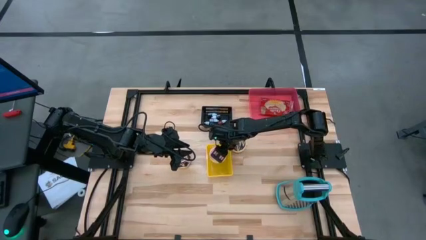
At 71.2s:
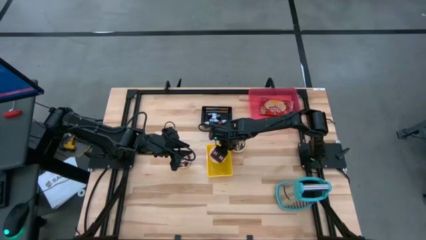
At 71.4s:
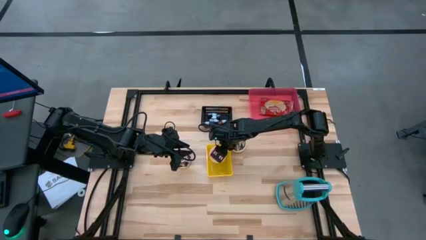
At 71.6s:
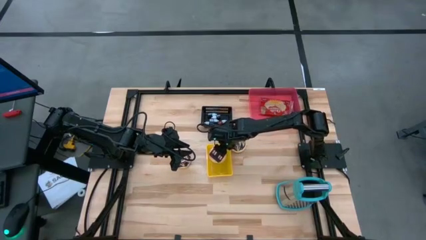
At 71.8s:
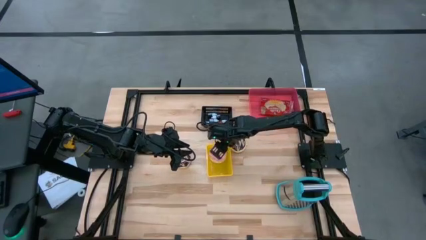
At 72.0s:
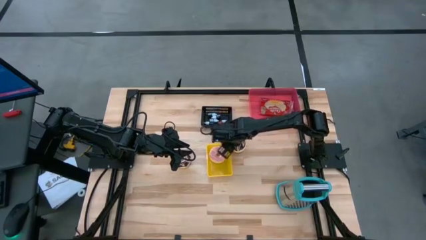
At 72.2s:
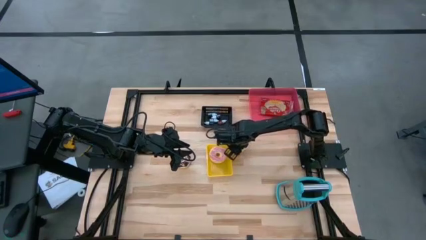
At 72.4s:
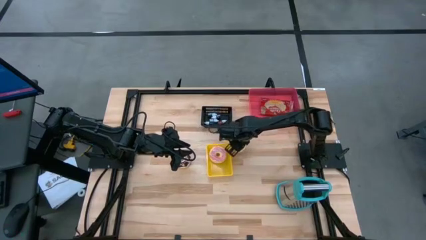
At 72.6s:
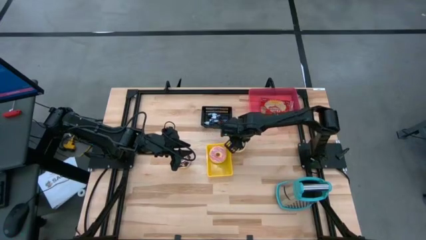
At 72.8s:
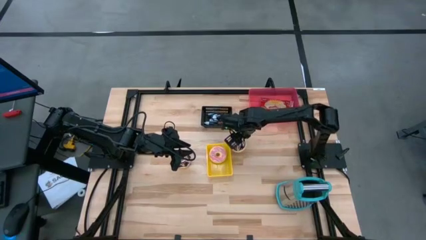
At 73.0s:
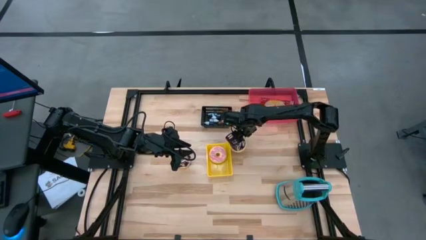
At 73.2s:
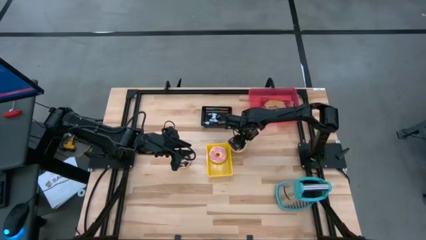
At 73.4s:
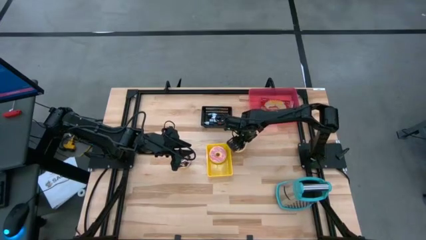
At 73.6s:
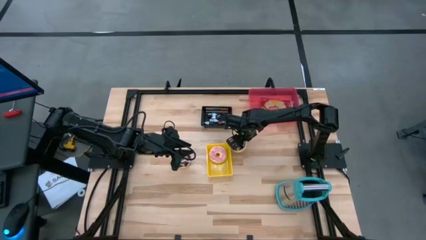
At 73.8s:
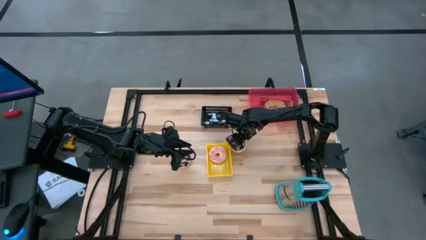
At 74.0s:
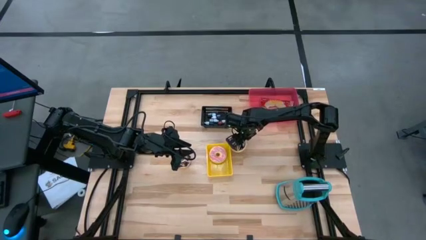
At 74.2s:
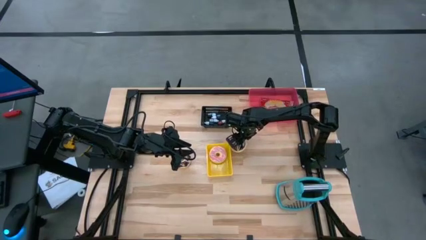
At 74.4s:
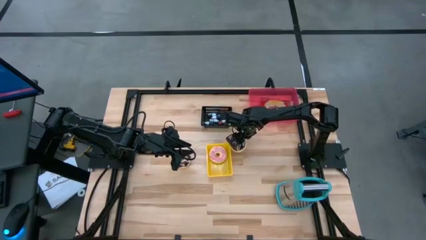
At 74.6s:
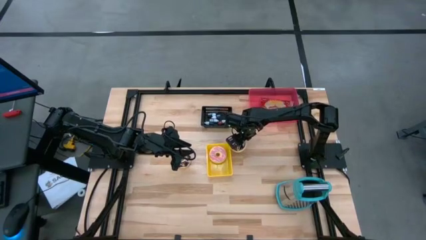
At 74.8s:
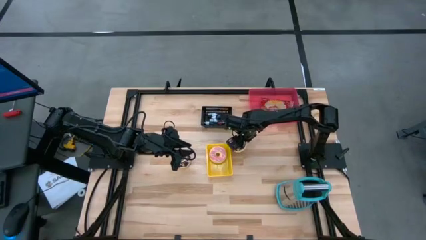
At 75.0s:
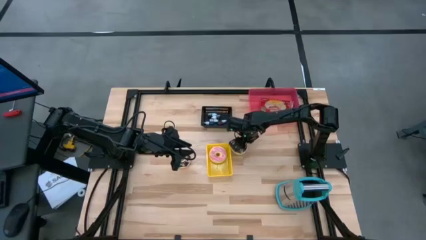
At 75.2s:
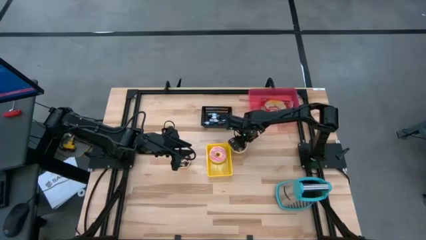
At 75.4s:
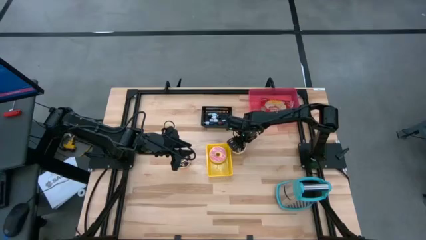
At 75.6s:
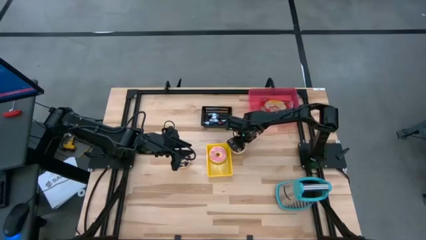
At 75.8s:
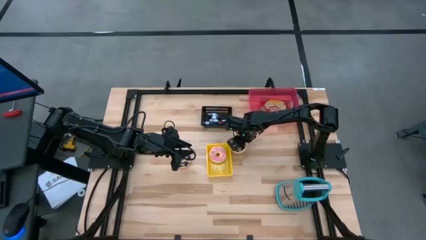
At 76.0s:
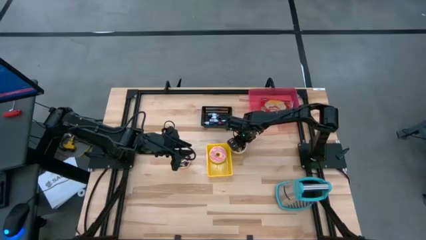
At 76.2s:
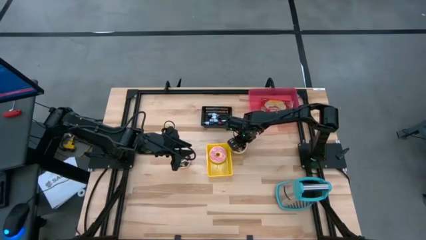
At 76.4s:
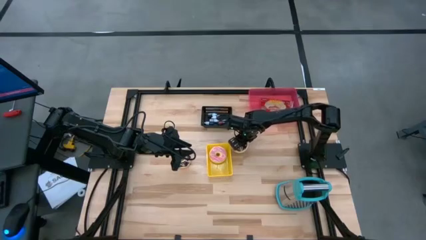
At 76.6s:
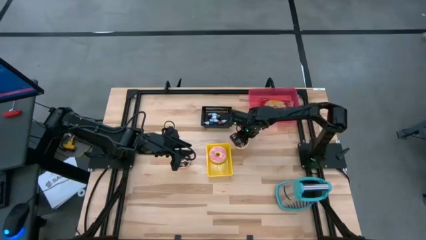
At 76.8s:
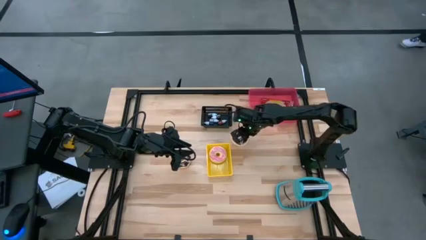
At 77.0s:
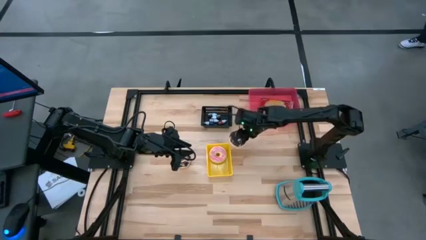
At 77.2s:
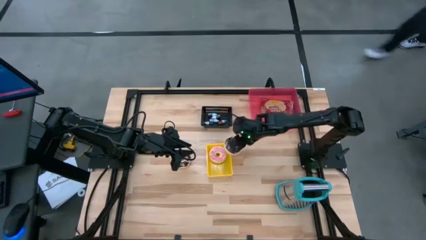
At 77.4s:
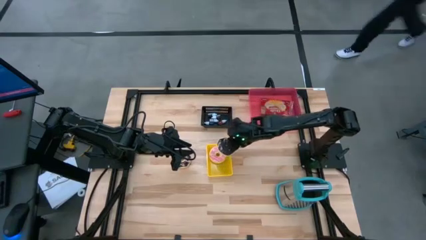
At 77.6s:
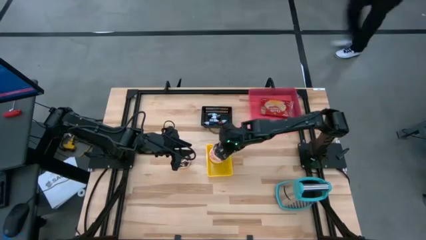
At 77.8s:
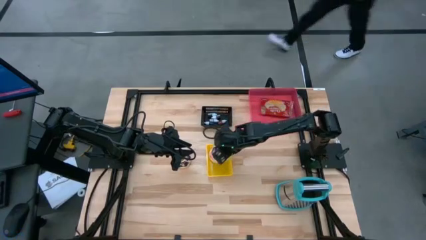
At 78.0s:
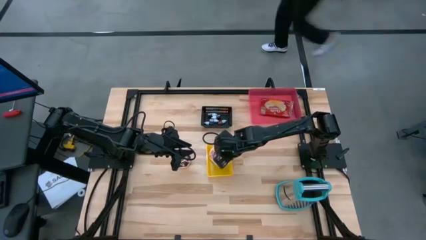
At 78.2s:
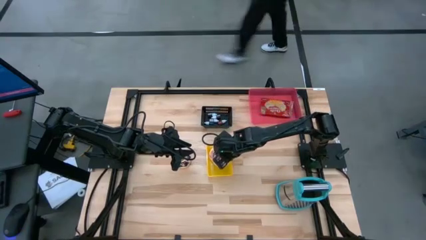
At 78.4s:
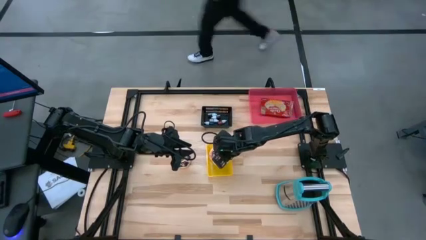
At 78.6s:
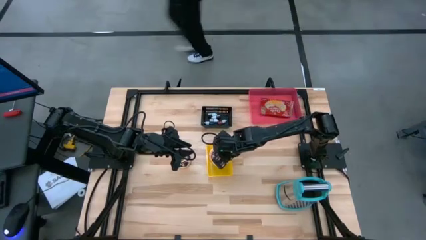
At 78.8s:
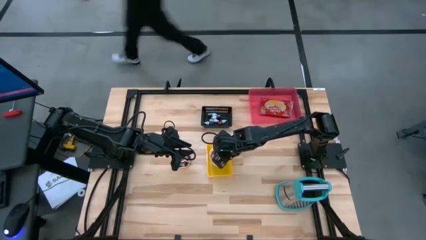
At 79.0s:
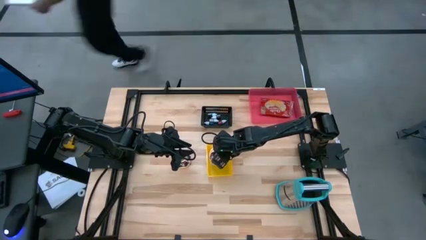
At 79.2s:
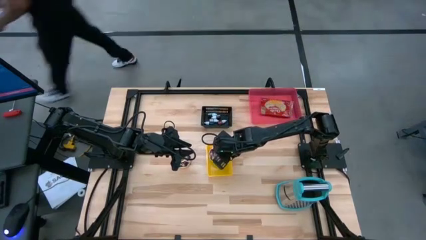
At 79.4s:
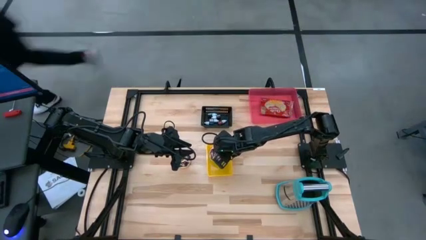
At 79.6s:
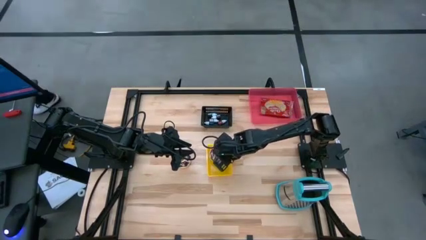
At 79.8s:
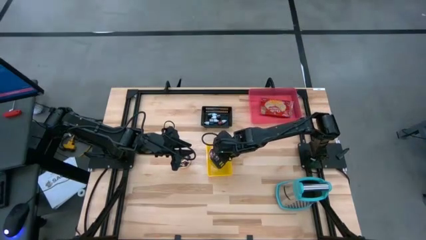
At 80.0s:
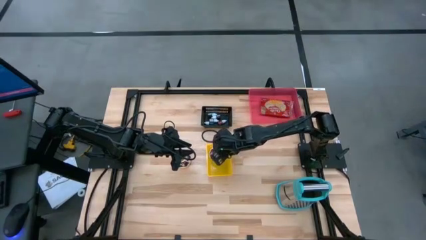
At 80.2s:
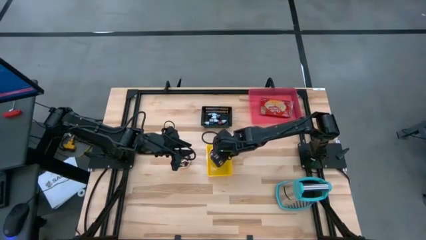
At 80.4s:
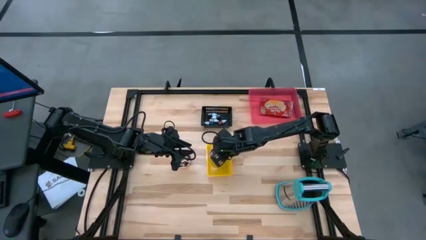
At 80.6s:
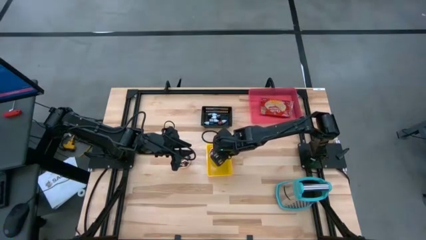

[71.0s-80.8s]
Put the right black donut into the yellow bin

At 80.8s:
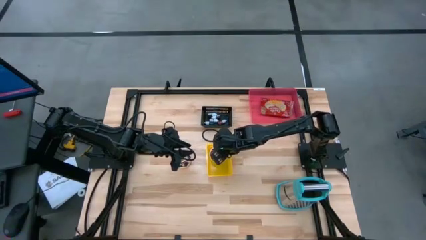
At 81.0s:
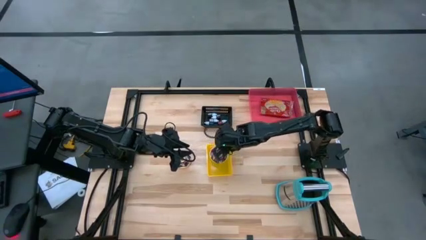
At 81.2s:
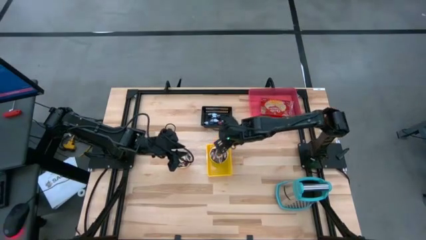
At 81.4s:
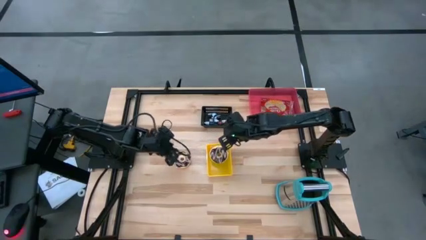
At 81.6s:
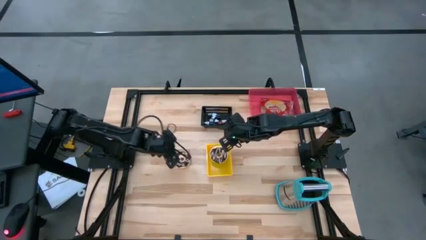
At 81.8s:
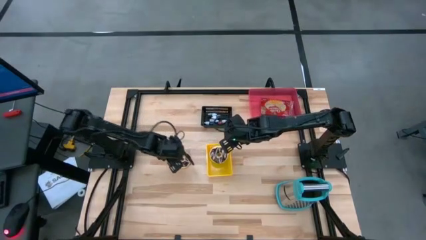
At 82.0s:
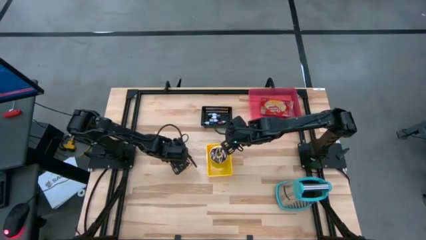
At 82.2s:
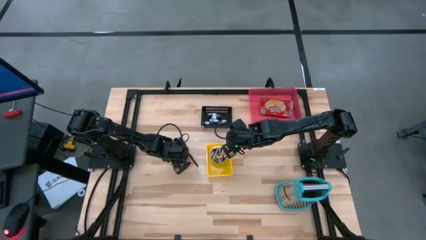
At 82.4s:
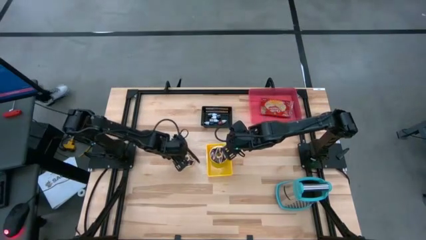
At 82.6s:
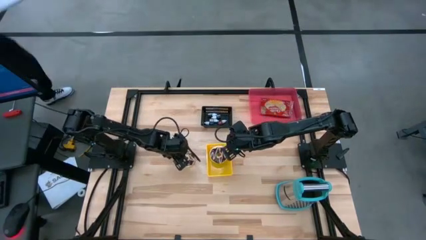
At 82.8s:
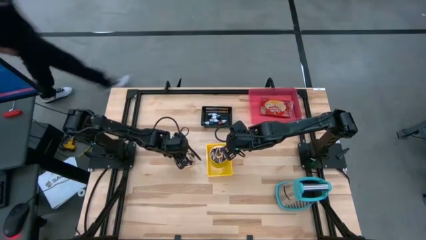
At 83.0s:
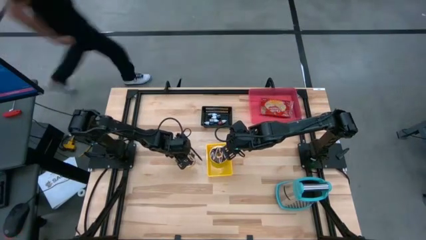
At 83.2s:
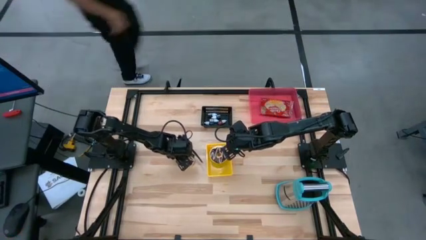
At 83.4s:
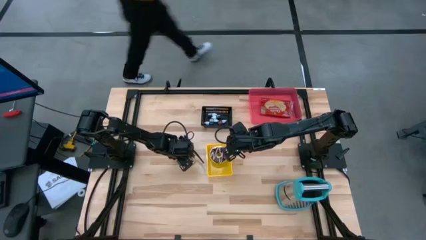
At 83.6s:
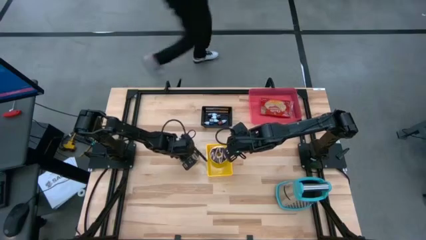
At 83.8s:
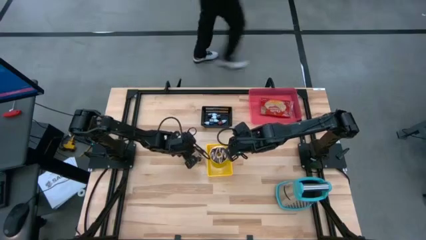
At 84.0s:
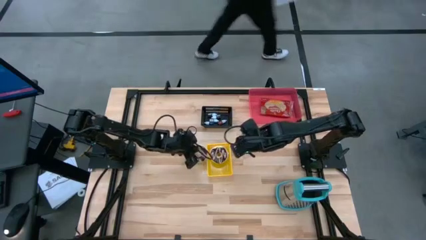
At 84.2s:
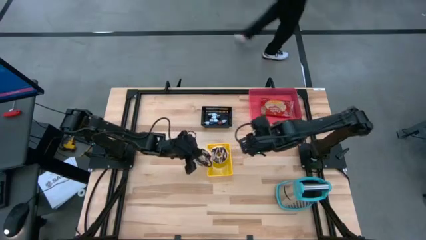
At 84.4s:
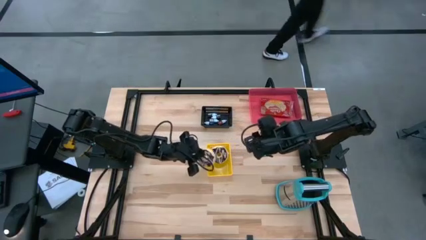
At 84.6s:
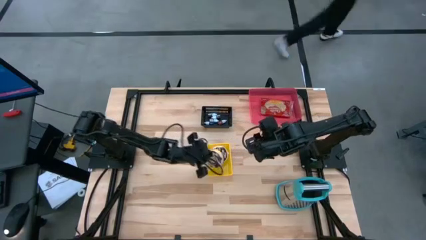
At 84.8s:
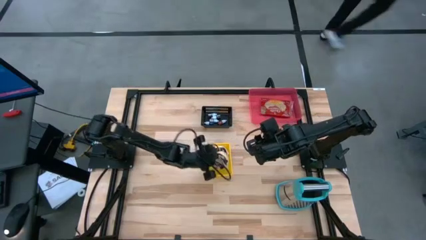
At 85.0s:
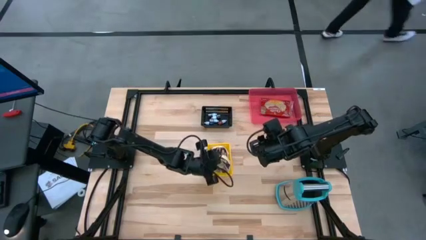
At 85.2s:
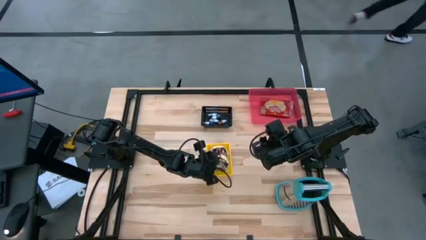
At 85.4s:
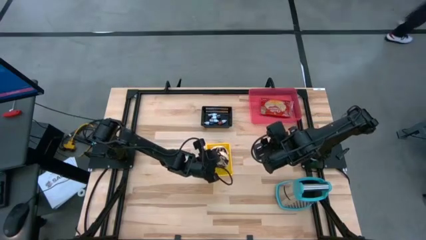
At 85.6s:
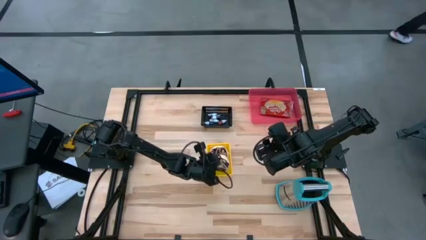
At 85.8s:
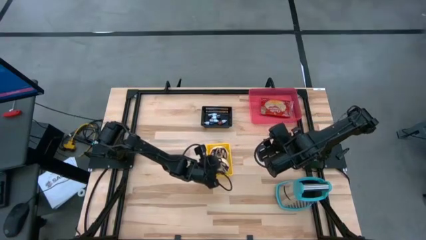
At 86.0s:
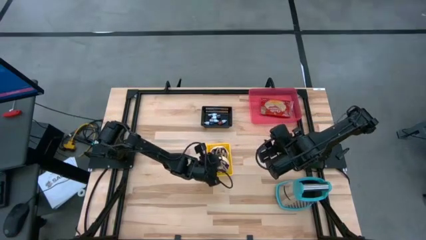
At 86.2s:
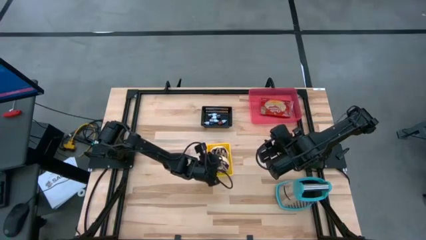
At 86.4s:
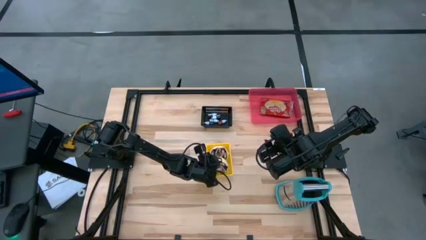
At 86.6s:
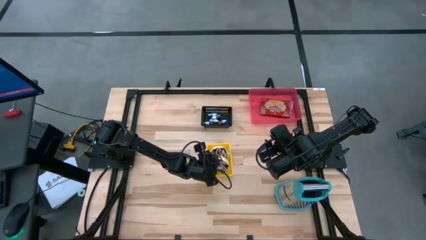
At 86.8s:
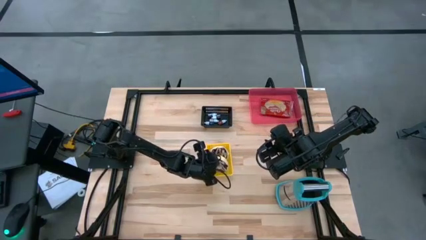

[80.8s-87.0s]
Put the black donut into the yellow bin
